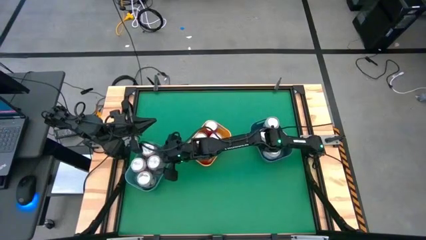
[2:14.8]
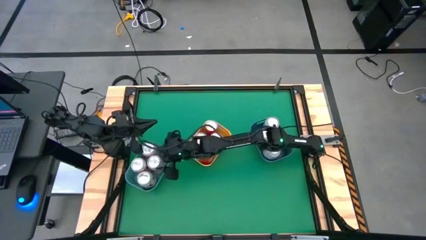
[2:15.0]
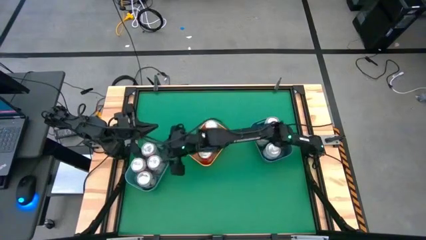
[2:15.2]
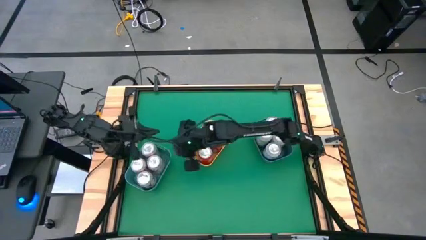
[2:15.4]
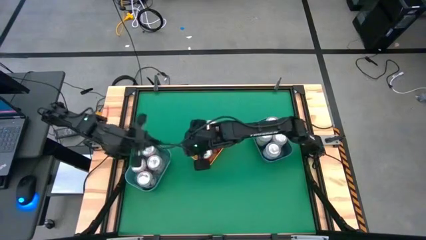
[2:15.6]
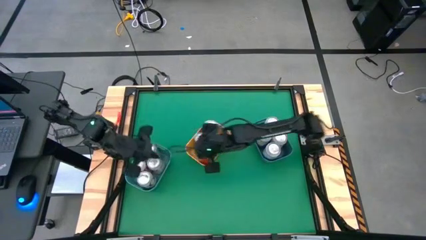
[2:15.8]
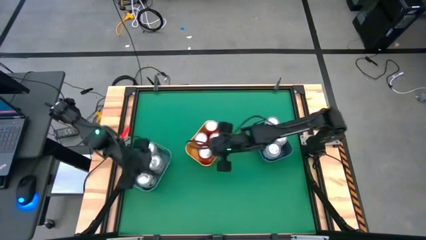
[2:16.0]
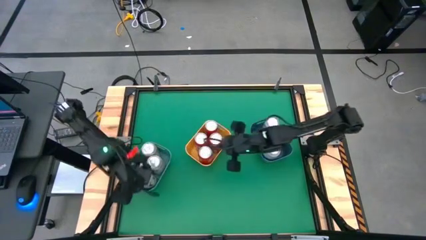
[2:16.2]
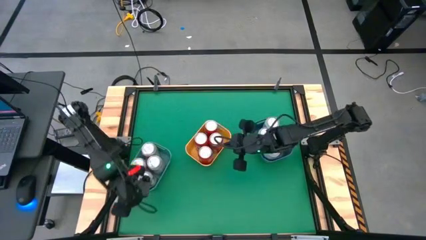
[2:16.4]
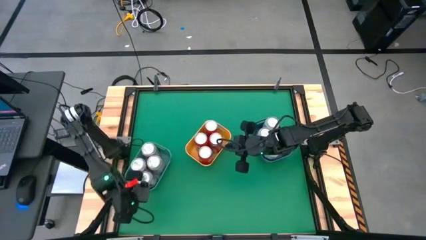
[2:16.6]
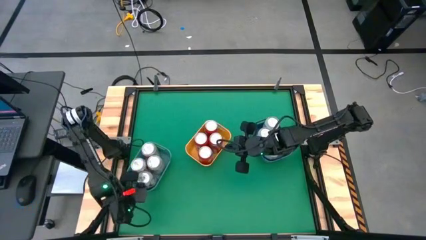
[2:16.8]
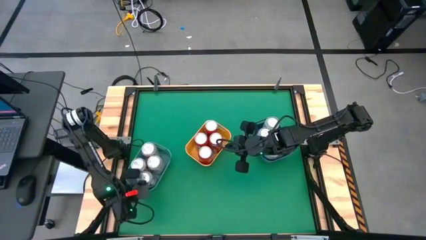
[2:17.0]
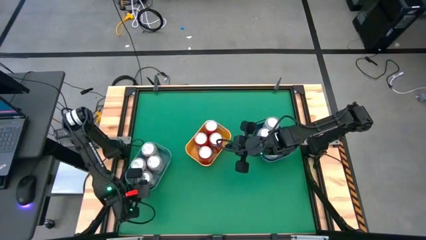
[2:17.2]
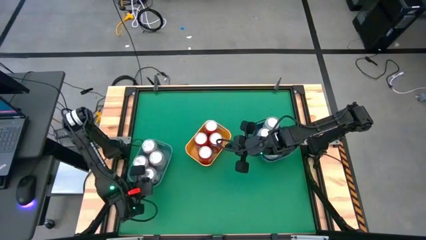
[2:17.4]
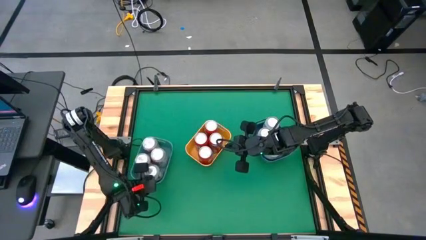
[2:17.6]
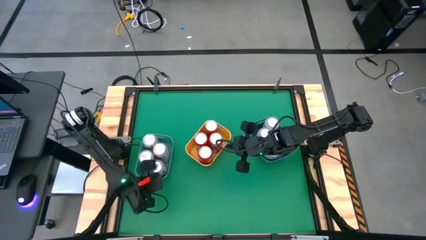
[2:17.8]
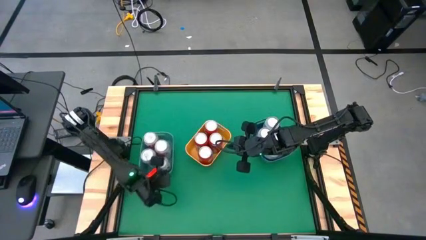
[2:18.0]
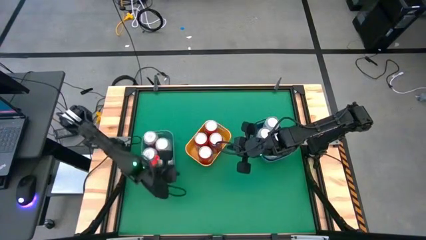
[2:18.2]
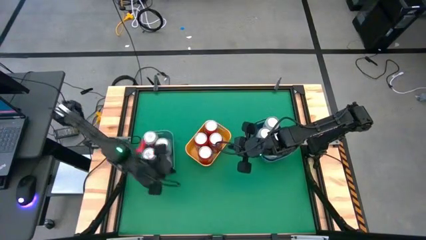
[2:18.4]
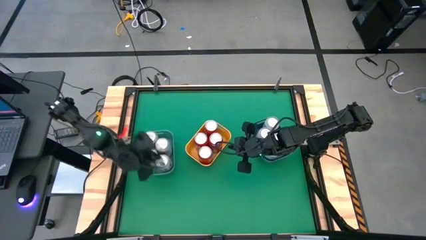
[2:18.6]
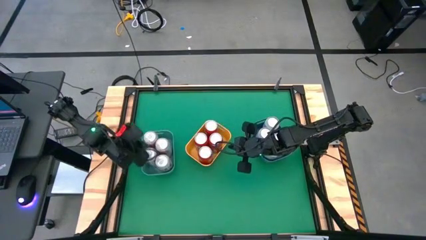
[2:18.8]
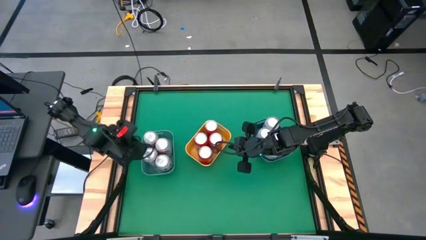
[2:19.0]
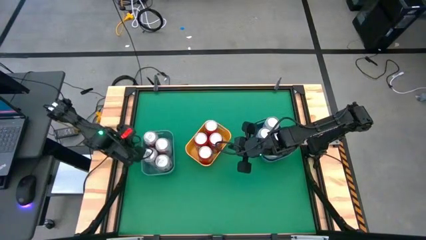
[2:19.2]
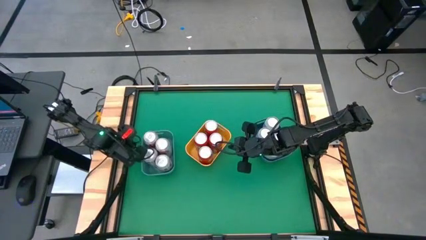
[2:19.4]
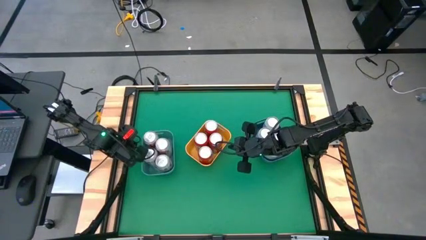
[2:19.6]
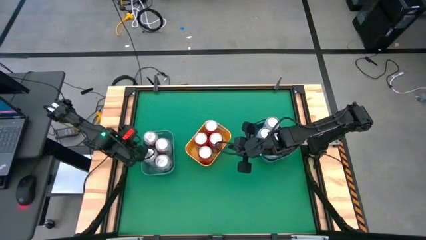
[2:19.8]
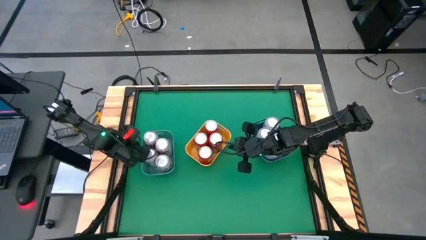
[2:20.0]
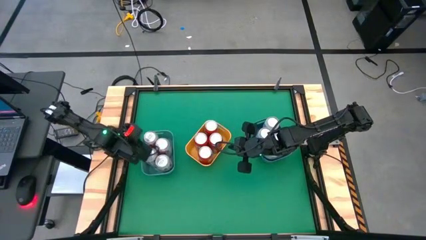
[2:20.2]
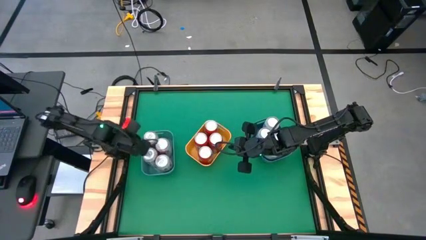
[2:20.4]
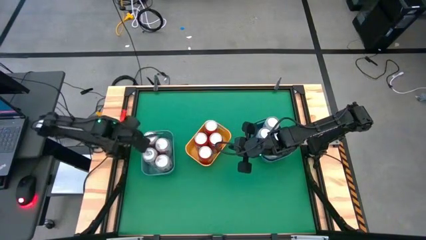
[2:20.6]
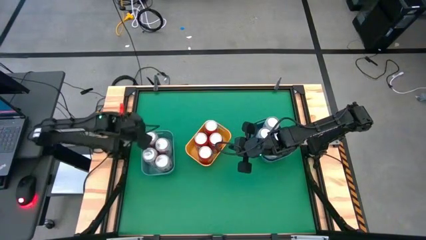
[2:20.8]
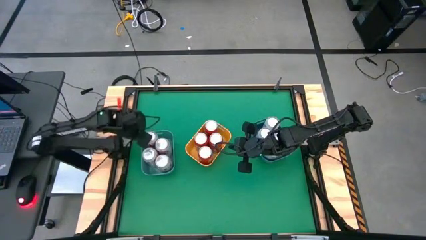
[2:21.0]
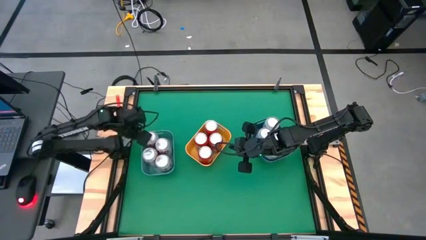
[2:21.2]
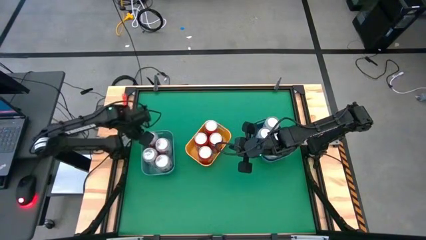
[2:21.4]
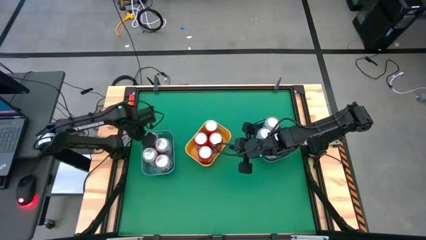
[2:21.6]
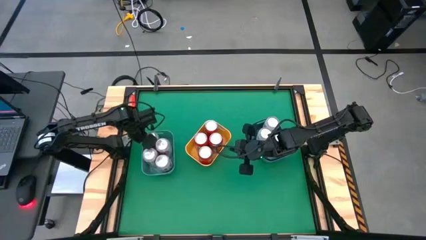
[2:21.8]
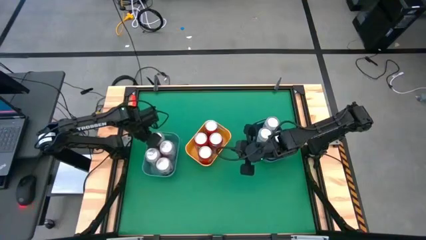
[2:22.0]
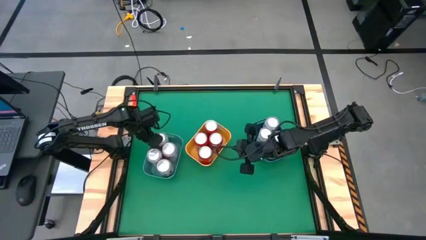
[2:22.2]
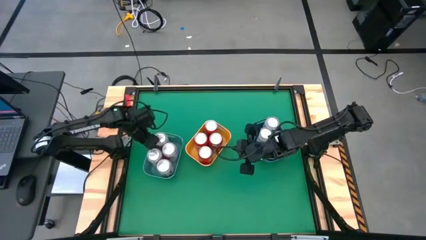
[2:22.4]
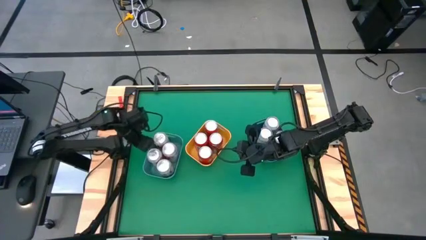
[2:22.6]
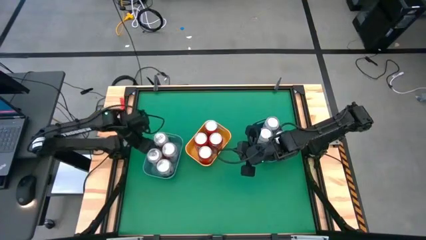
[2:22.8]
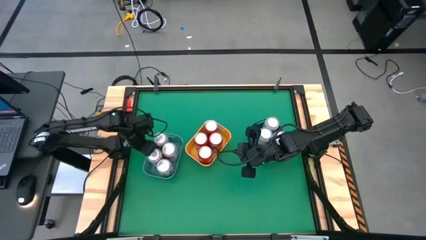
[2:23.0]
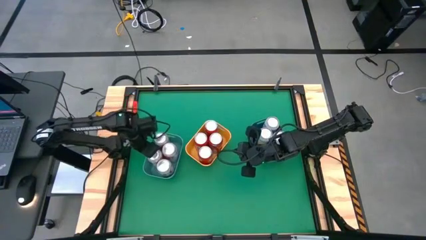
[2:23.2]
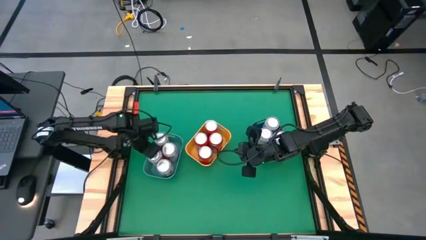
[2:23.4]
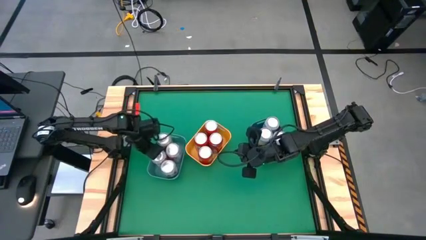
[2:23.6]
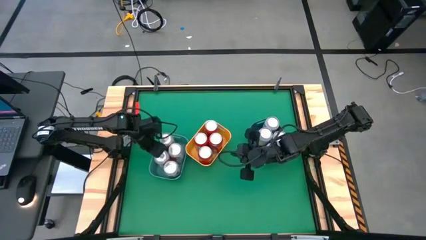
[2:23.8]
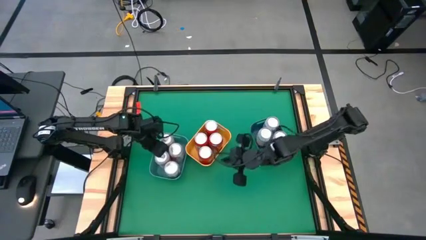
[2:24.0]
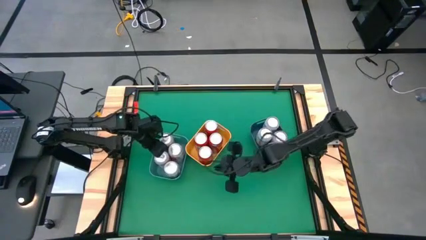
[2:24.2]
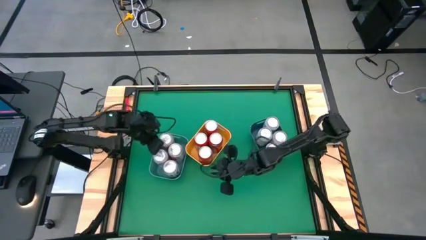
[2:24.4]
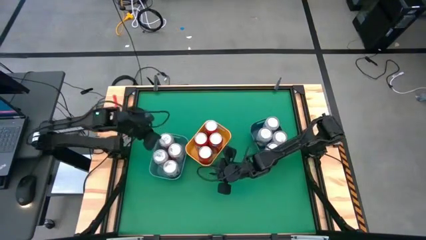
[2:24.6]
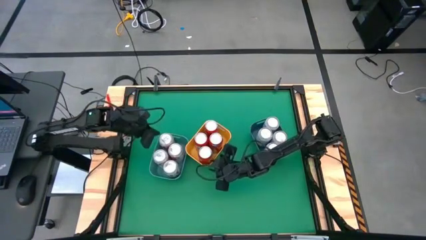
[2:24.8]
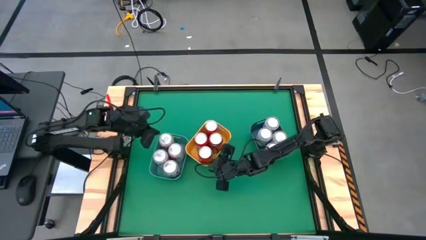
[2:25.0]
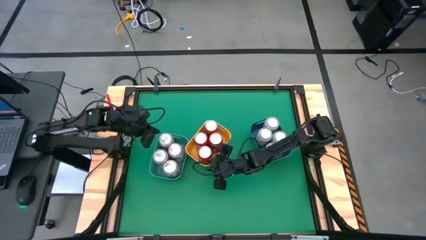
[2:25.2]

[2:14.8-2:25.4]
Task: Sort soda cans
Adjust the bins
